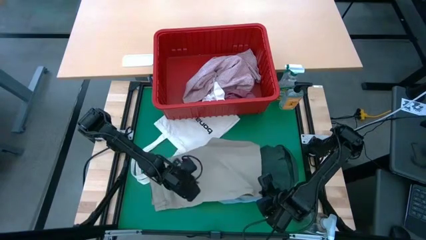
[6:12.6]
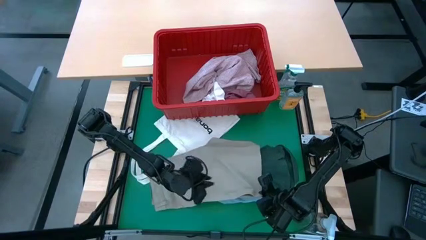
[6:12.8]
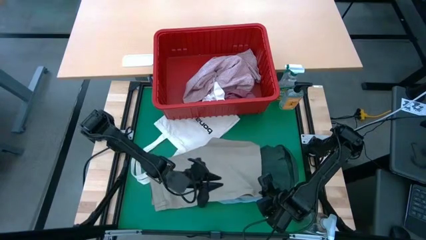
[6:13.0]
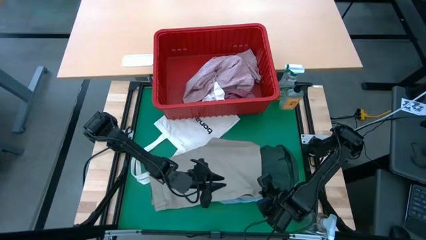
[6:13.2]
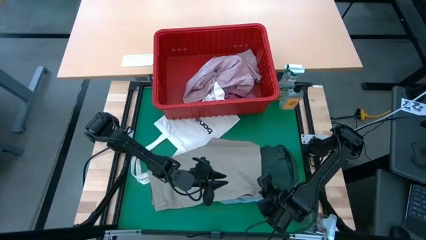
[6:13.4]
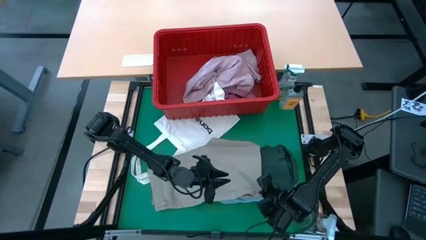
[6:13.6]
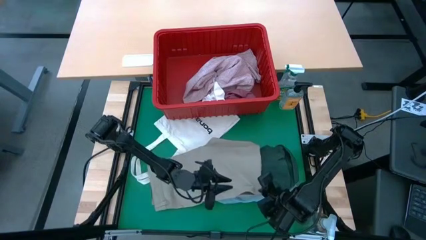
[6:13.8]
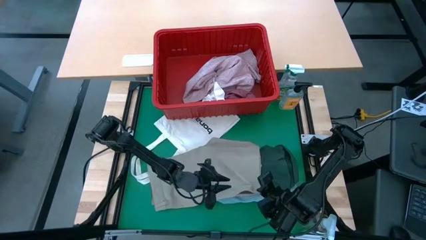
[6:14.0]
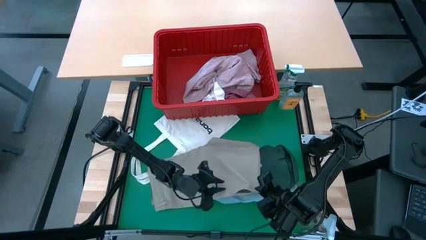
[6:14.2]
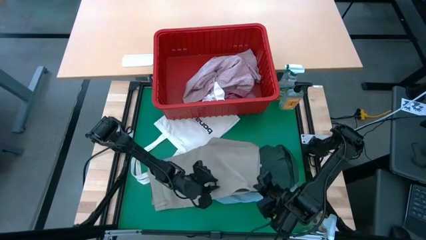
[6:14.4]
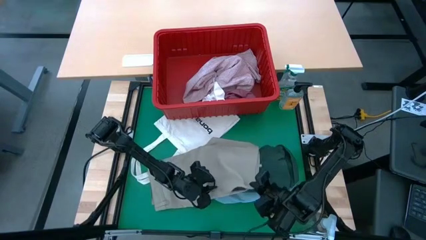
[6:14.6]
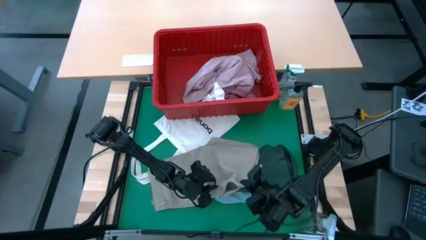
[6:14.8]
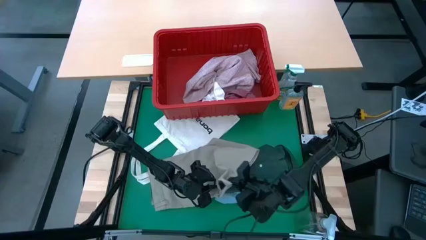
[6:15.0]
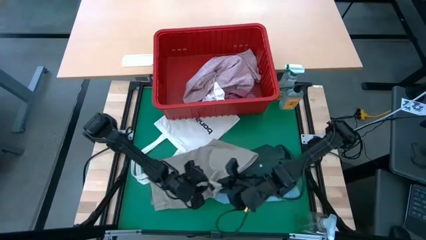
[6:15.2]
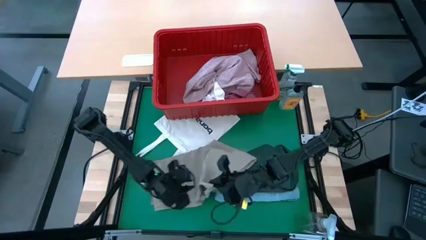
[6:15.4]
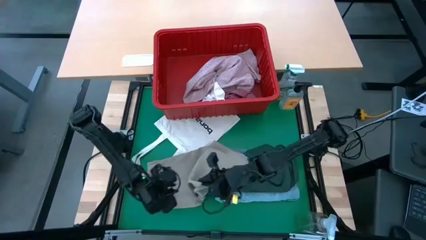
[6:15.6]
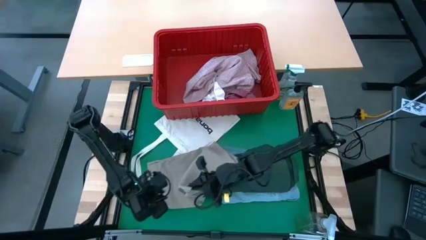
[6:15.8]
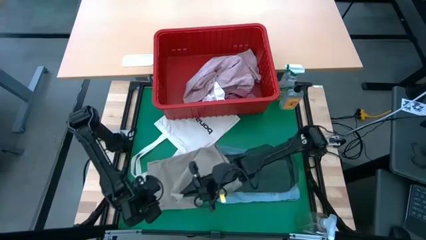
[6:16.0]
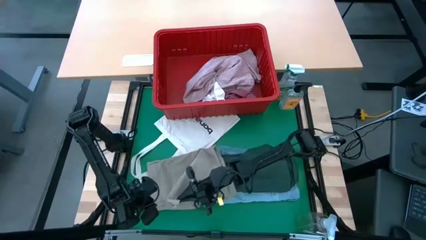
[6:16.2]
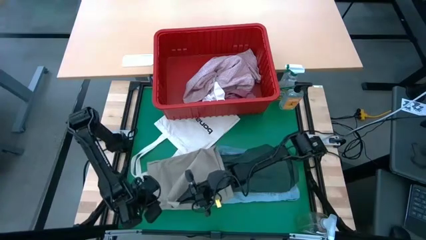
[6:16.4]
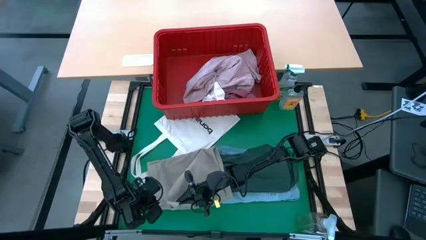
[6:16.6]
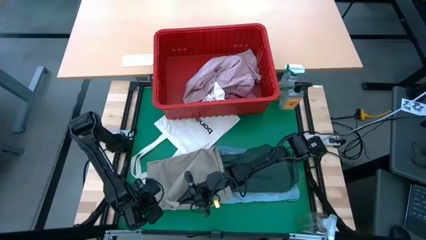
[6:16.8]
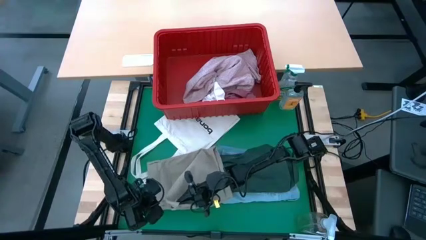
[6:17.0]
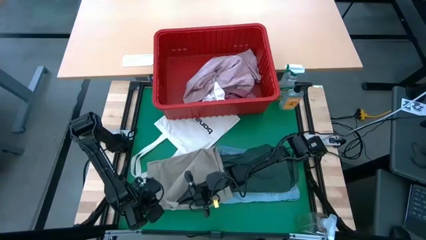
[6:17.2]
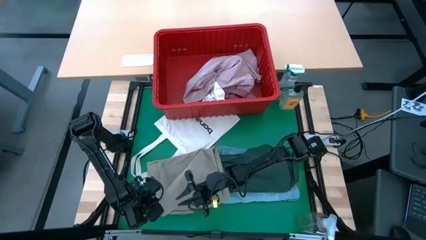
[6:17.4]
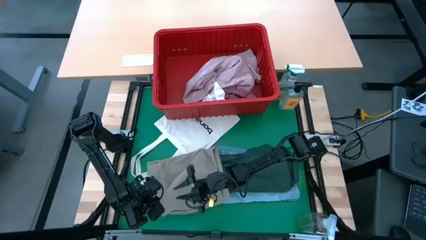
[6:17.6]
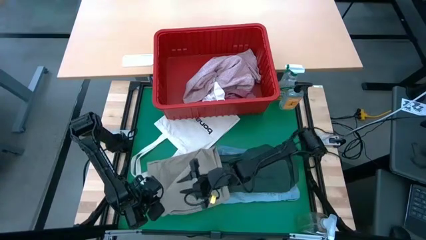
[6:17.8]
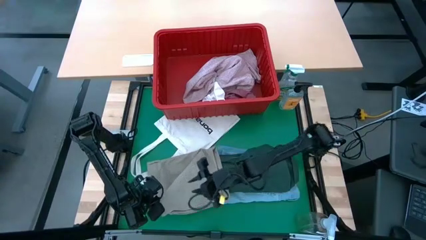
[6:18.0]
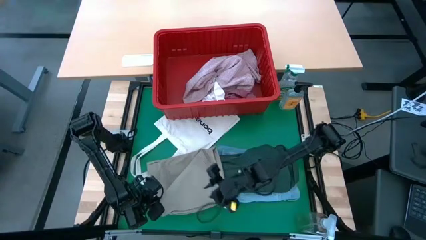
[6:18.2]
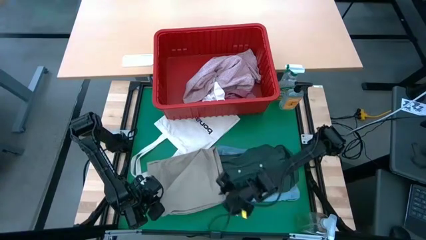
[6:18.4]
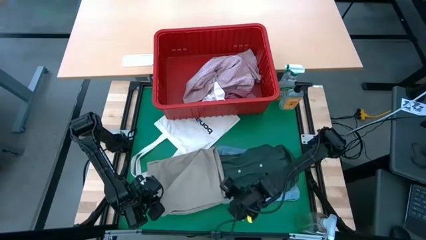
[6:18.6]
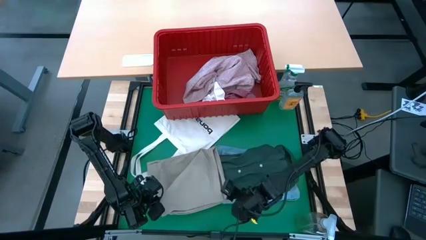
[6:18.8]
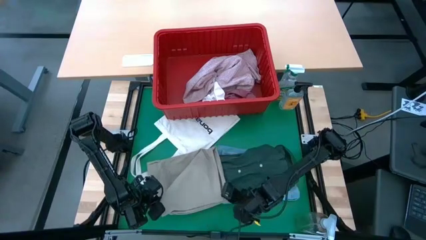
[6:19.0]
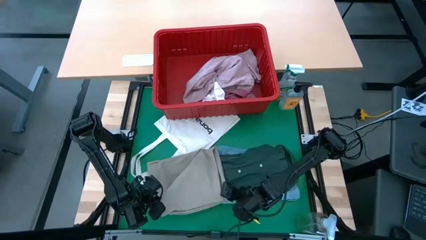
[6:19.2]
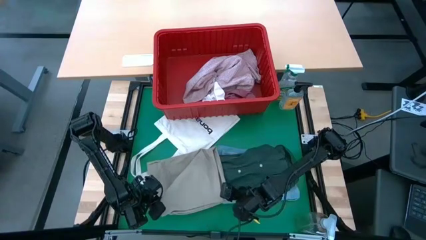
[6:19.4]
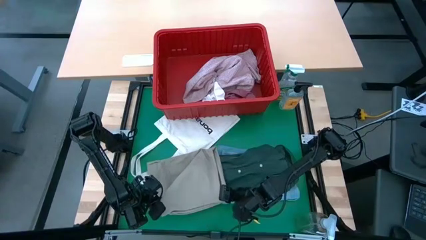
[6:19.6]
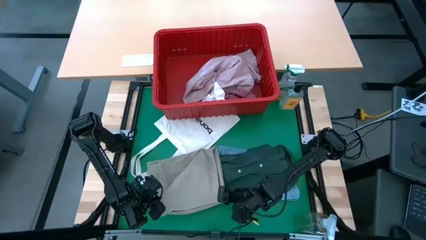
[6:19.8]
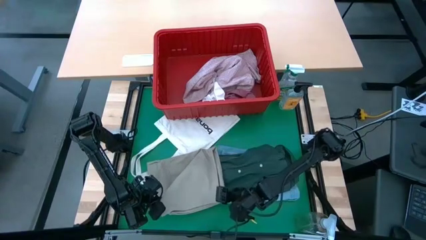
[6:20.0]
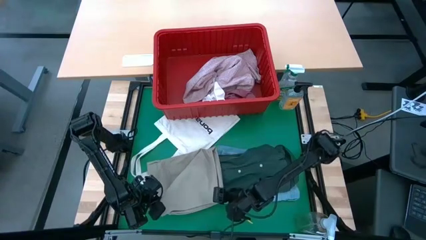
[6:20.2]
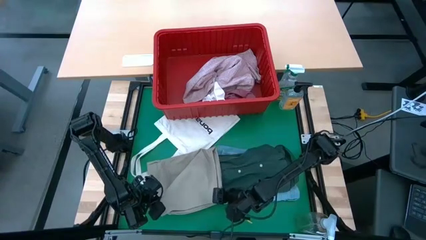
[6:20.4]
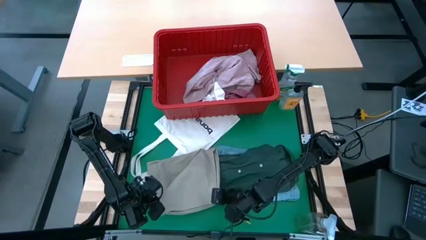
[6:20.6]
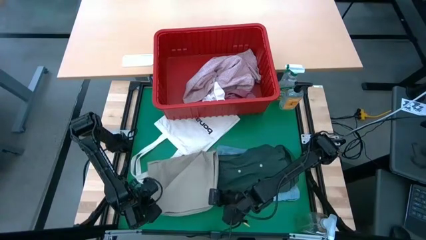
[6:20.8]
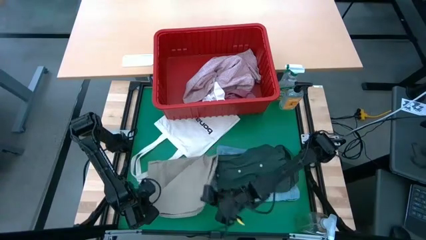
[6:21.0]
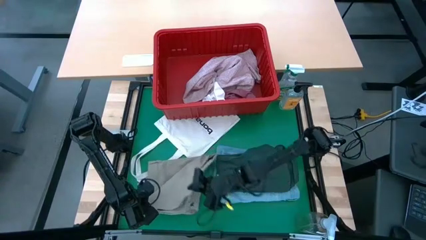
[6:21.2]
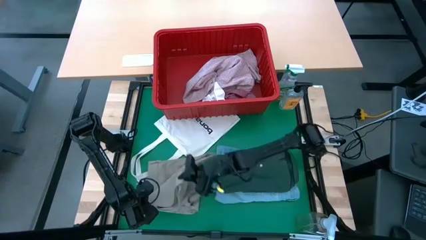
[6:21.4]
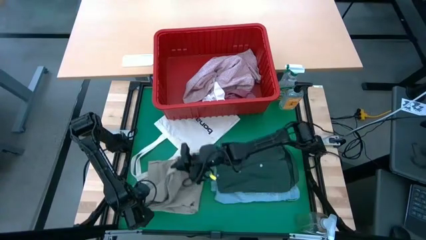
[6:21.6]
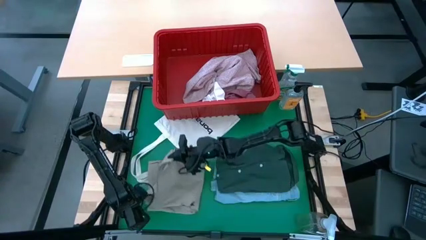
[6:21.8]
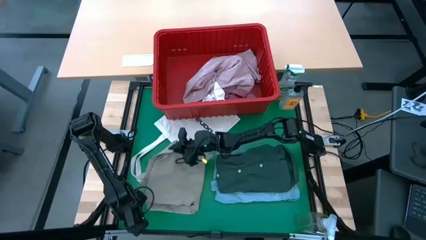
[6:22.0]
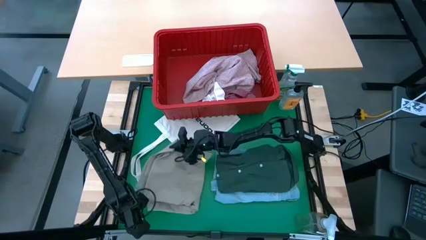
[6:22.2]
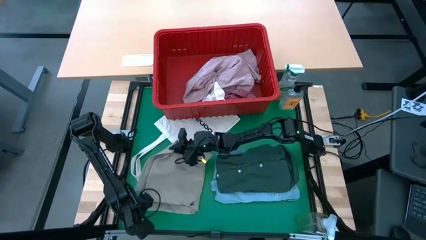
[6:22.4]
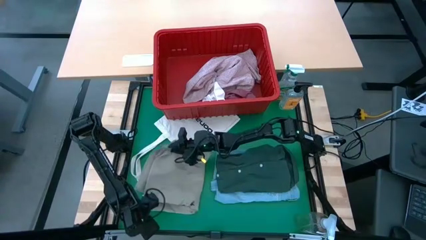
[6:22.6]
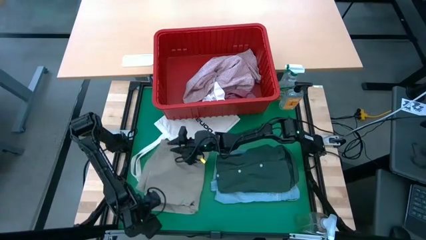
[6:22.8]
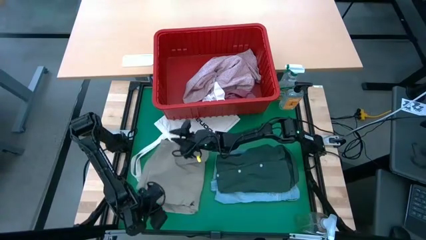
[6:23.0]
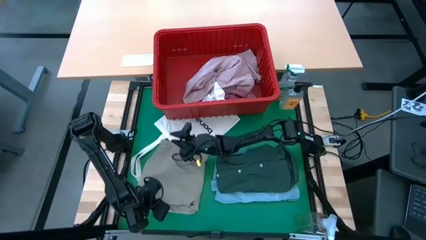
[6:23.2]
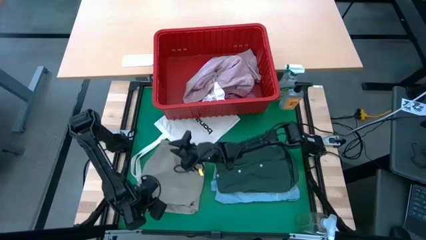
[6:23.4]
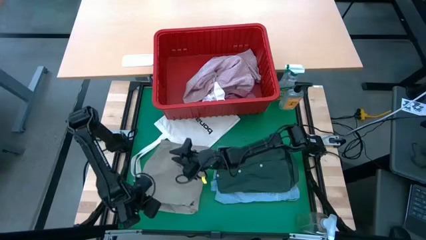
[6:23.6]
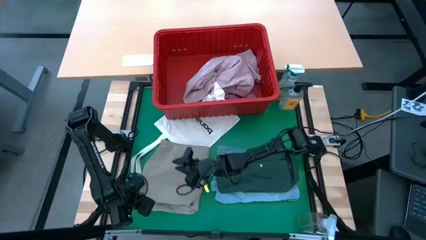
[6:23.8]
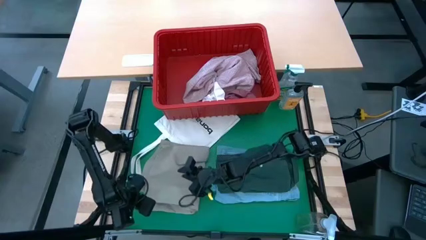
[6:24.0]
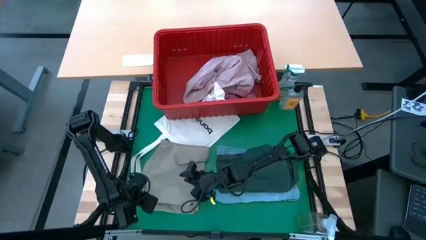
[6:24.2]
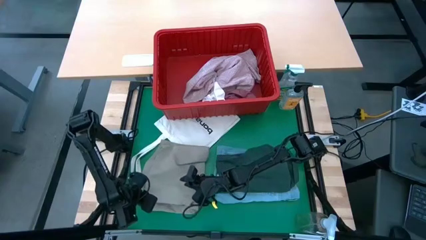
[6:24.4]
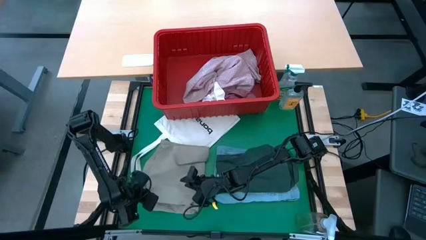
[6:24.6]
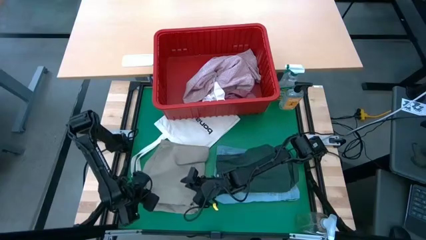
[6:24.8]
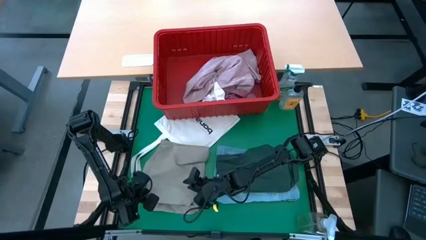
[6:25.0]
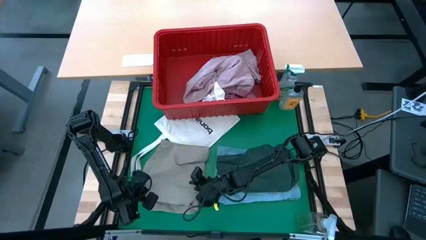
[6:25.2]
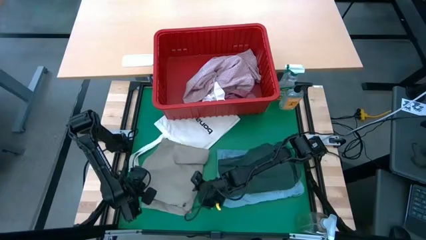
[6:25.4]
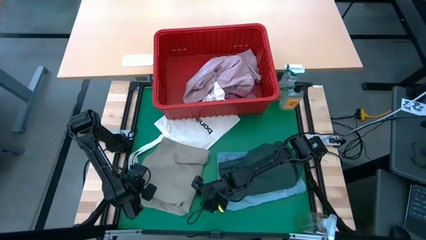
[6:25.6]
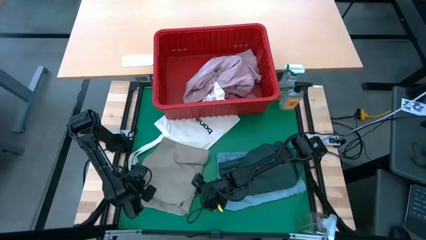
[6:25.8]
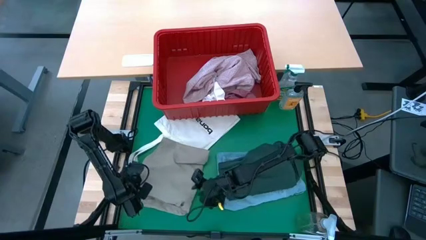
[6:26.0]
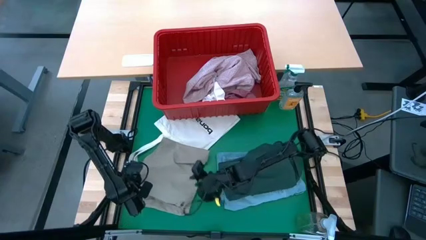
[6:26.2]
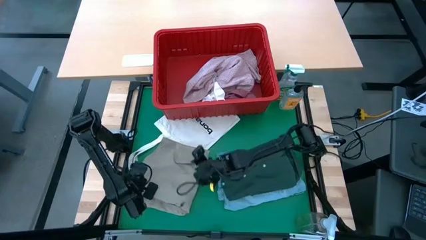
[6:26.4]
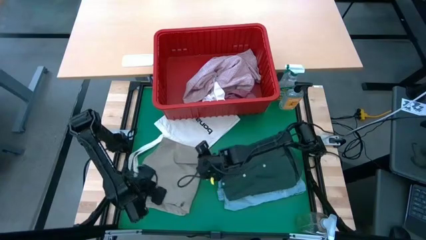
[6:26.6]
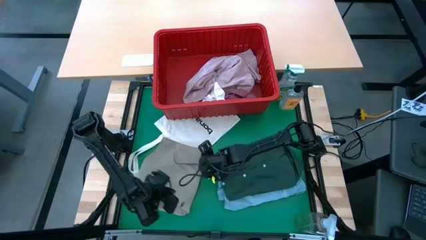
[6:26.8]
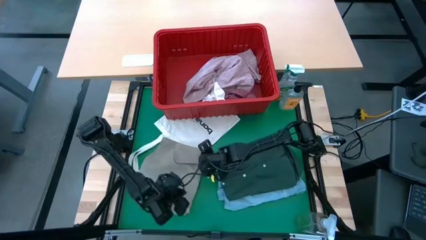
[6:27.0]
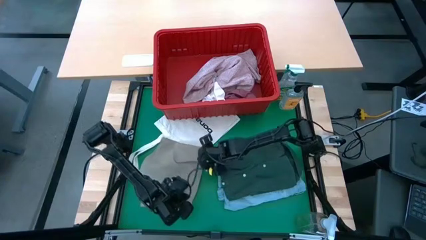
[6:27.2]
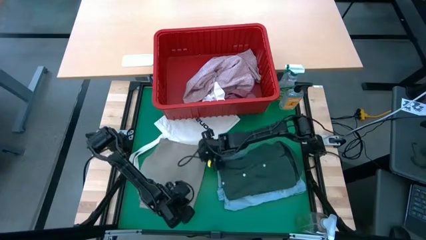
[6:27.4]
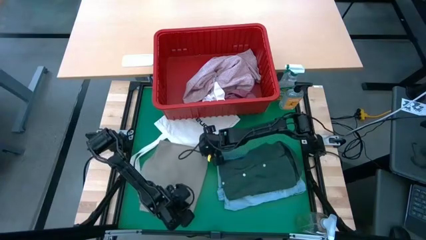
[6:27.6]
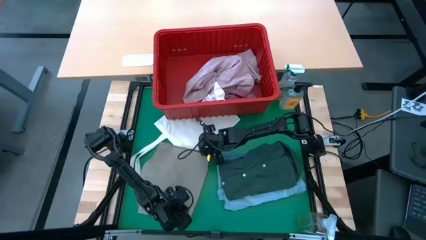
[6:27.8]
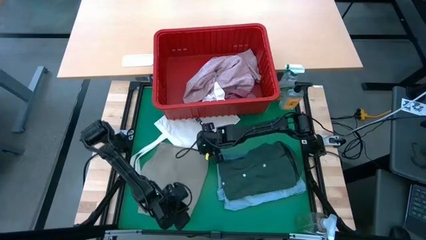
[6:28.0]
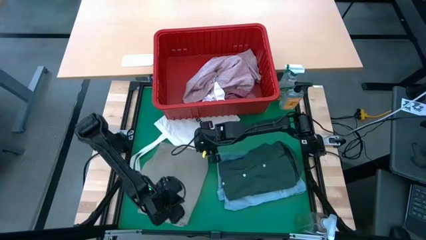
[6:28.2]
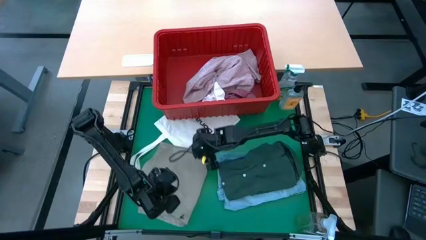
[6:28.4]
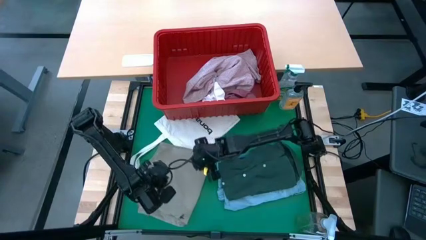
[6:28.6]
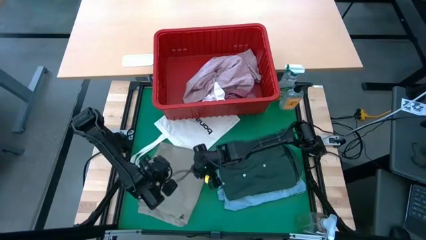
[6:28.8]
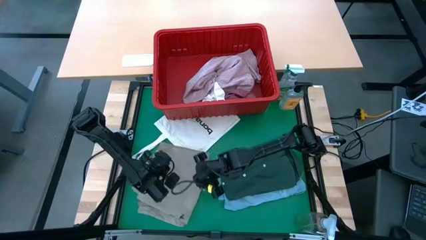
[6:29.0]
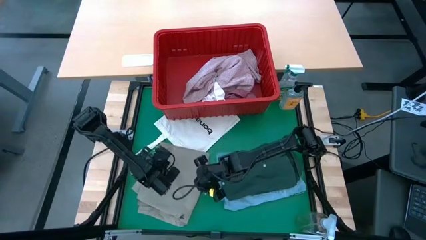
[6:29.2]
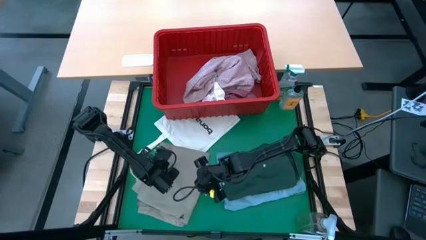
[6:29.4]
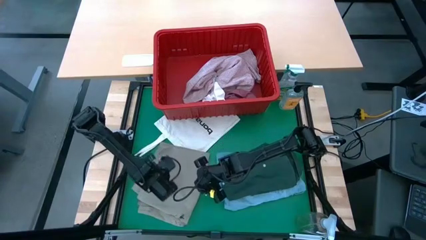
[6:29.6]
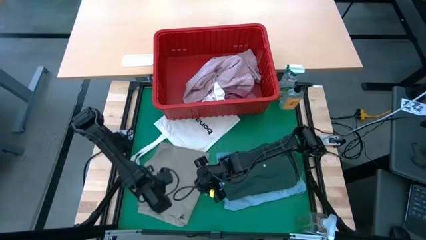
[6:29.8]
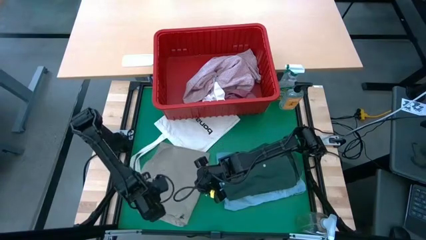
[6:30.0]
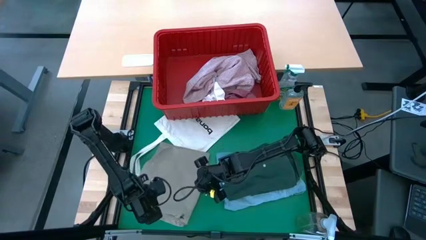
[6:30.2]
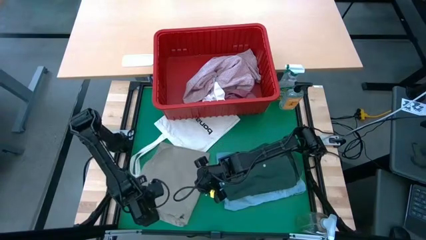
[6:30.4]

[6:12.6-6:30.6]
Task: Fold laundry
Fold the gray shorts
